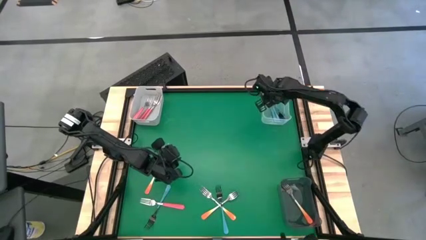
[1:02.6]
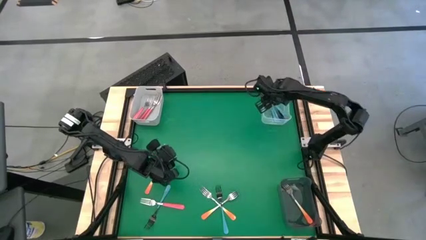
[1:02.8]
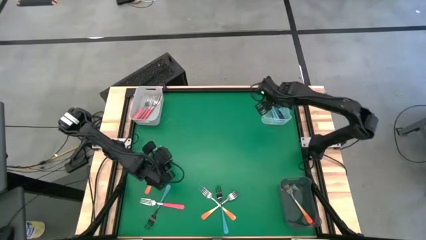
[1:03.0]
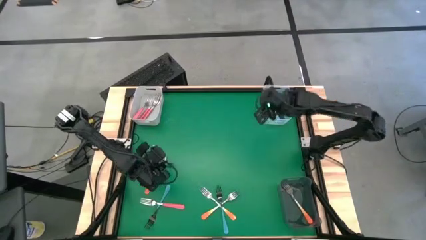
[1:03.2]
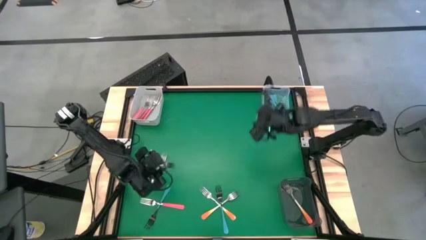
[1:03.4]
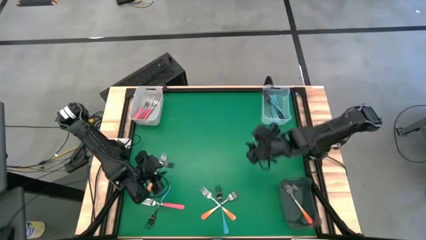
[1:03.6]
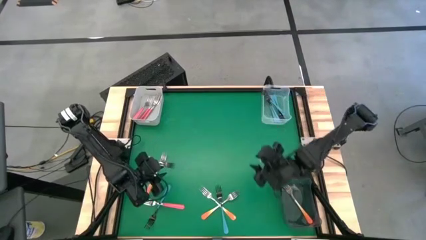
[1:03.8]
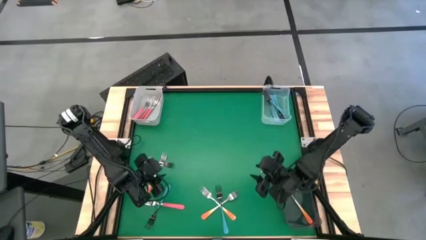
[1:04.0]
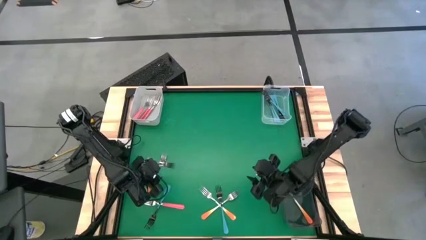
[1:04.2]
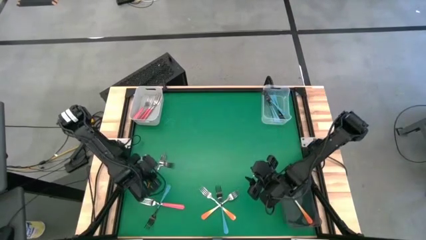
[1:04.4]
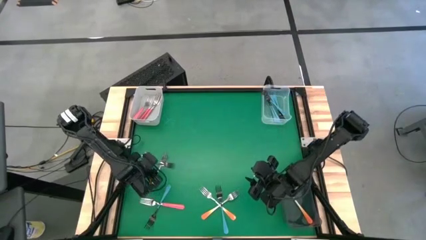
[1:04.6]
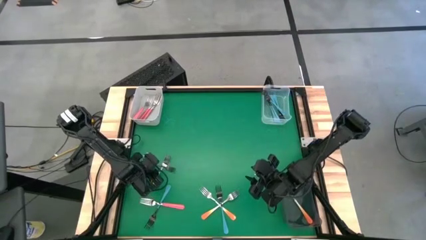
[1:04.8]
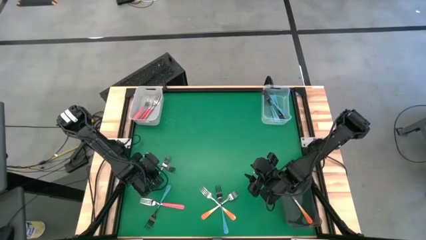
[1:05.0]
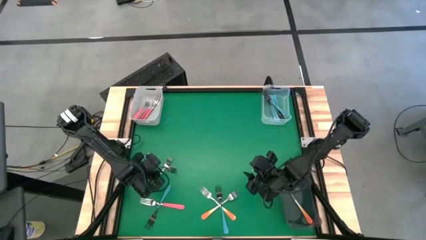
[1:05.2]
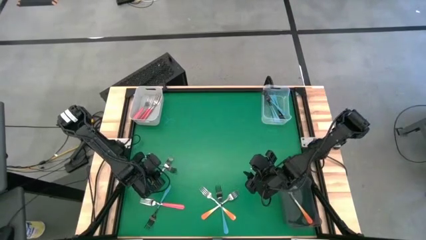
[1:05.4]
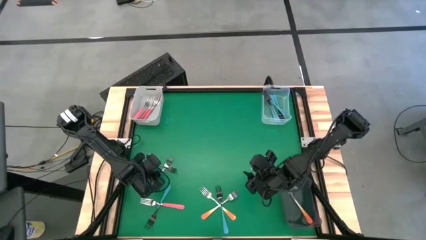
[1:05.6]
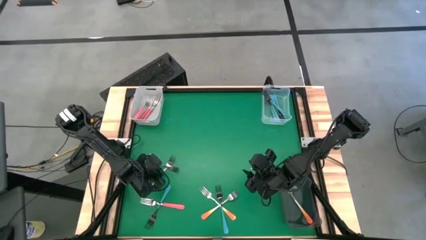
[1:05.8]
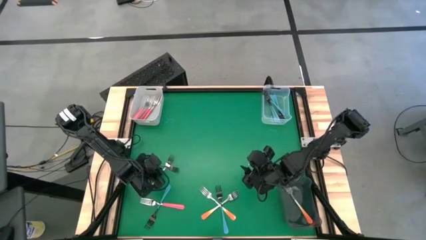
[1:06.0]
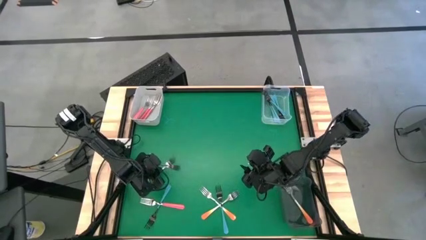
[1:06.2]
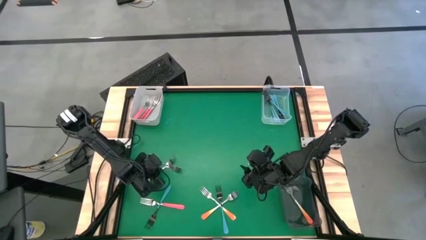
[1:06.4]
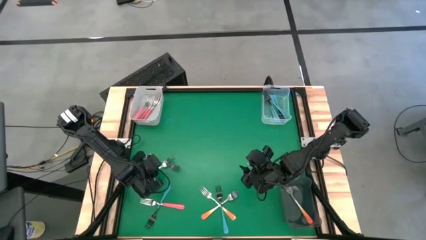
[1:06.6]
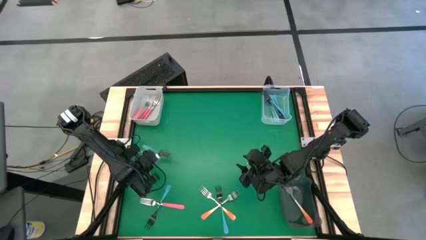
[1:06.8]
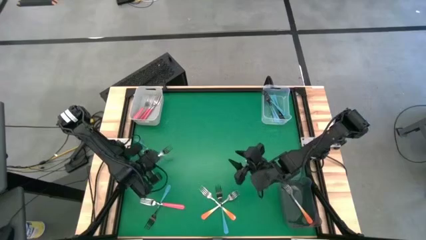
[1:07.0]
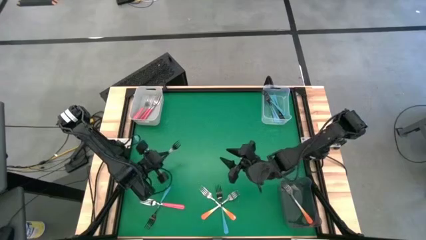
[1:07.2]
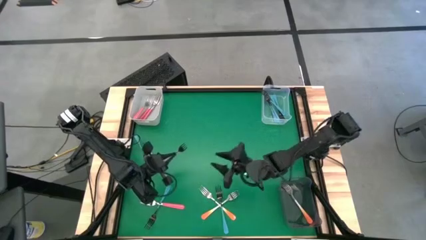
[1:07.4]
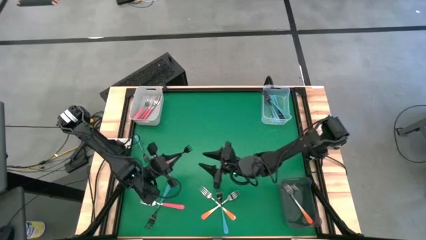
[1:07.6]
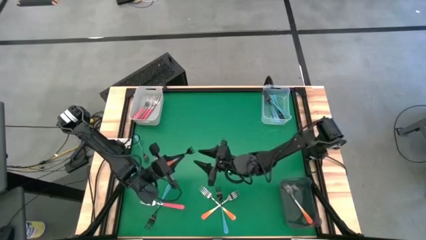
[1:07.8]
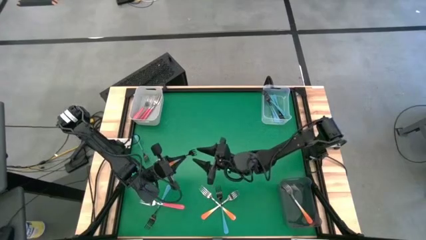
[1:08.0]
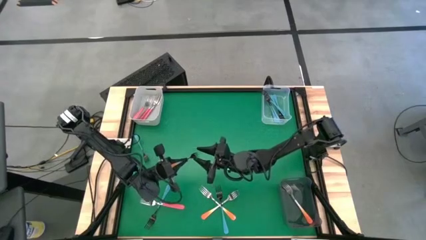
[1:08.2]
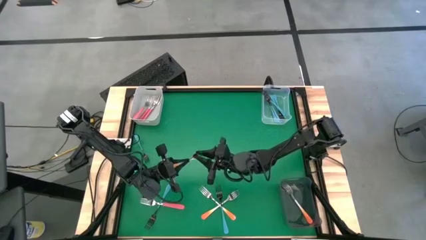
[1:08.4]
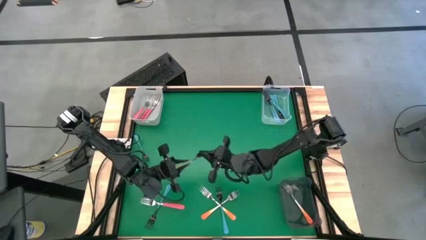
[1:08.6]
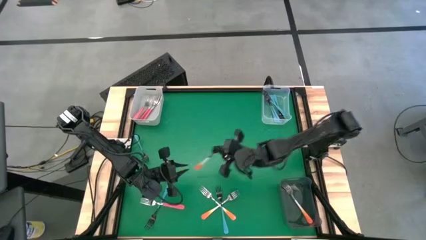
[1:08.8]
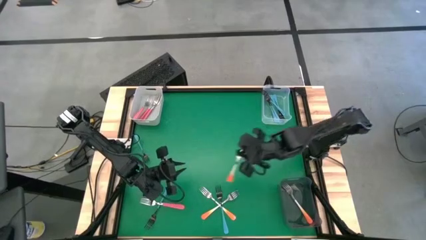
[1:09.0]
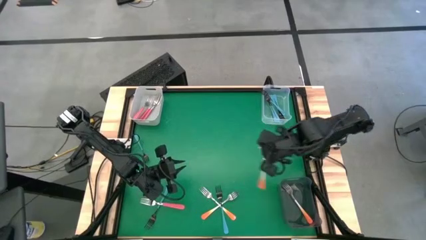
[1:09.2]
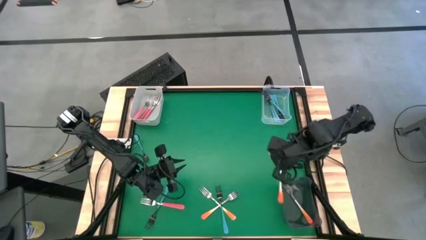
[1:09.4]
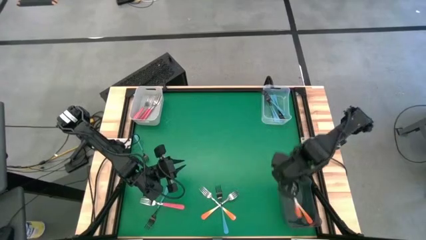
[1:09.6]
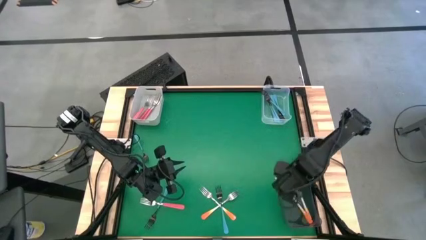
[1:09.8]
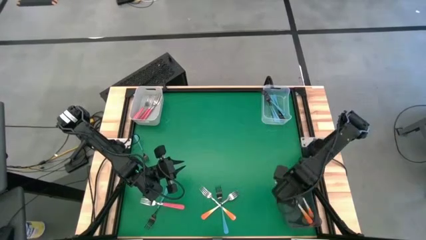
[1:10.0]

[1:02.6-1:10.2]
Task: Sort silverware by color (type)
Put the orange fork into the black bin

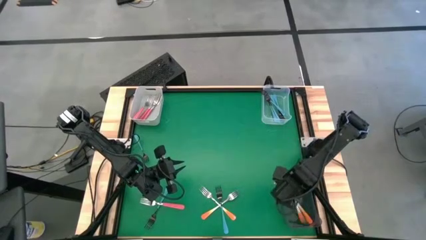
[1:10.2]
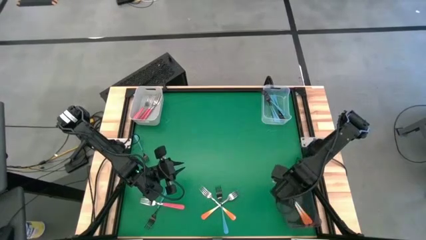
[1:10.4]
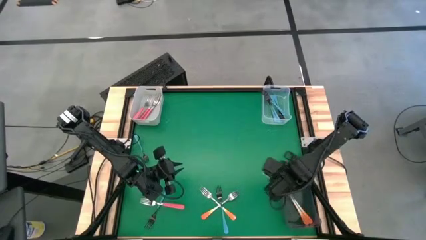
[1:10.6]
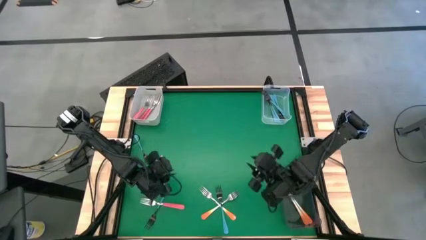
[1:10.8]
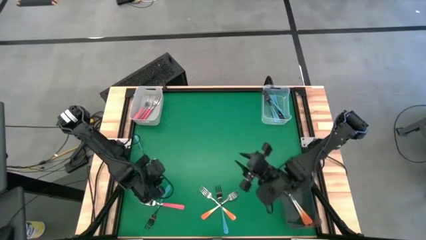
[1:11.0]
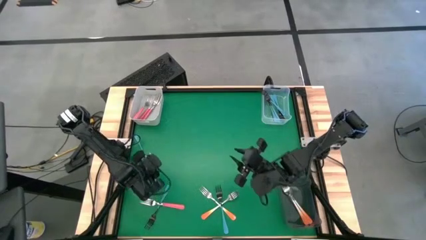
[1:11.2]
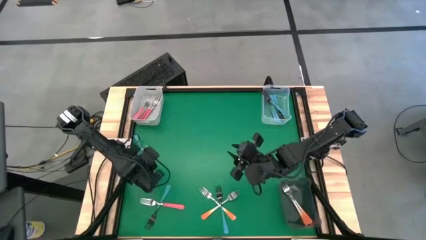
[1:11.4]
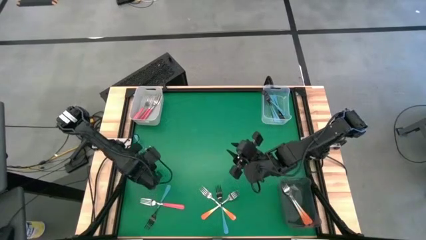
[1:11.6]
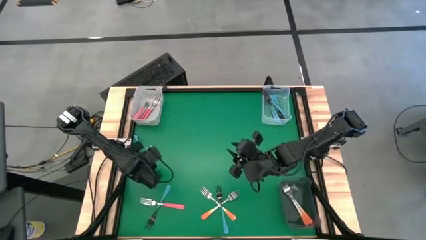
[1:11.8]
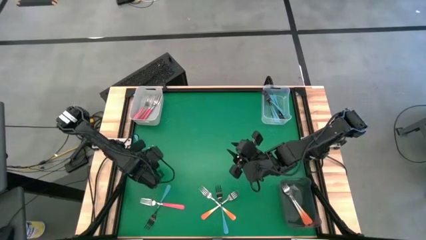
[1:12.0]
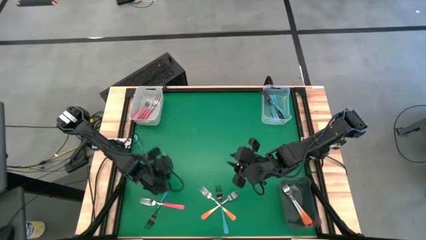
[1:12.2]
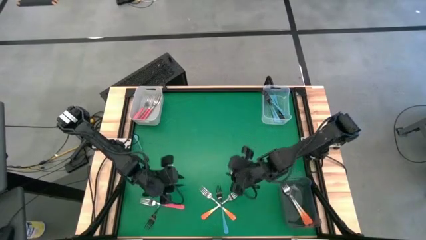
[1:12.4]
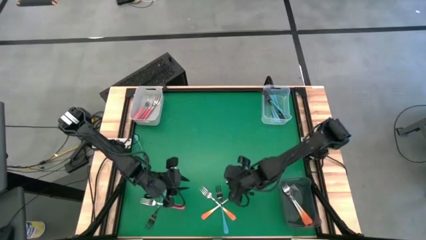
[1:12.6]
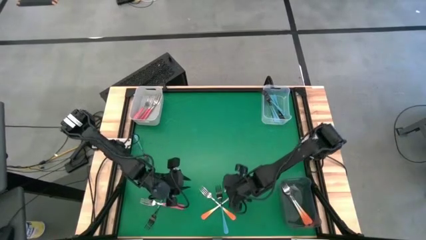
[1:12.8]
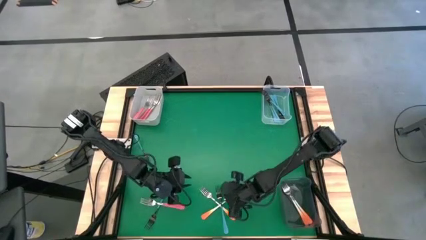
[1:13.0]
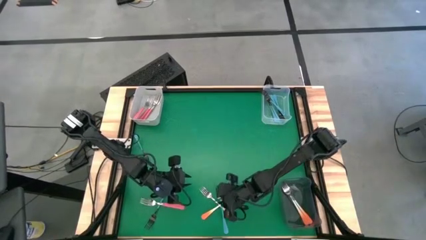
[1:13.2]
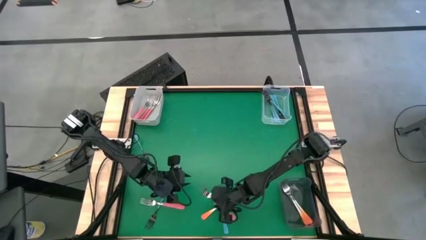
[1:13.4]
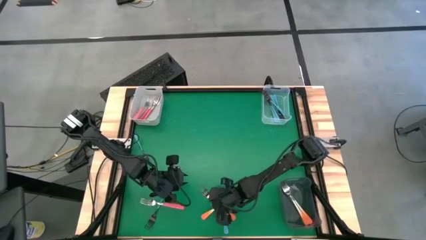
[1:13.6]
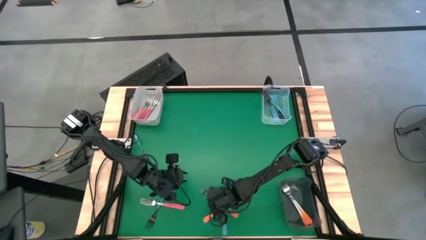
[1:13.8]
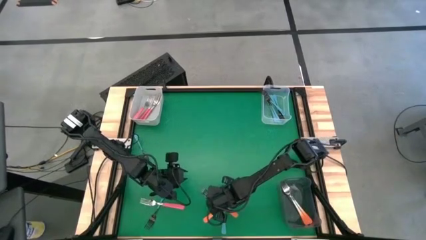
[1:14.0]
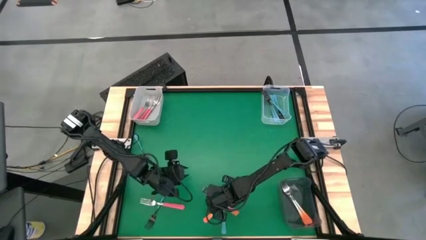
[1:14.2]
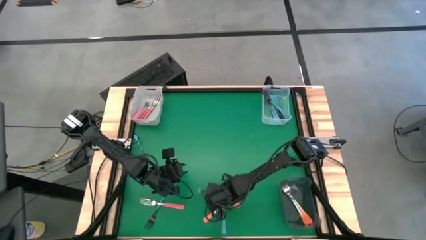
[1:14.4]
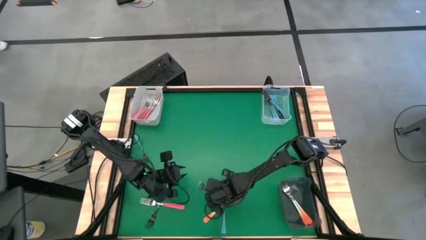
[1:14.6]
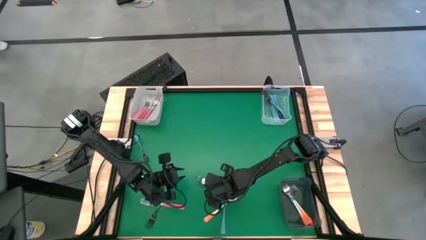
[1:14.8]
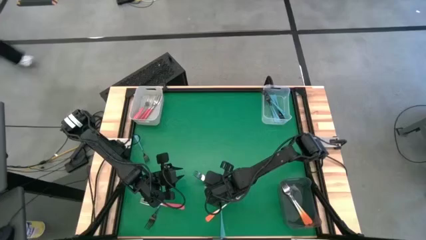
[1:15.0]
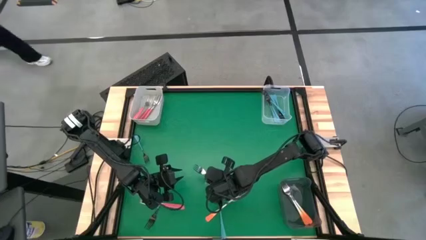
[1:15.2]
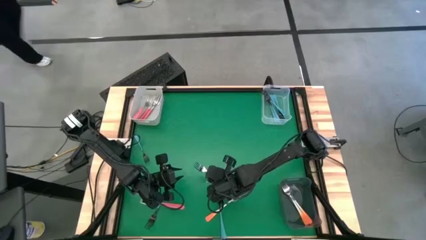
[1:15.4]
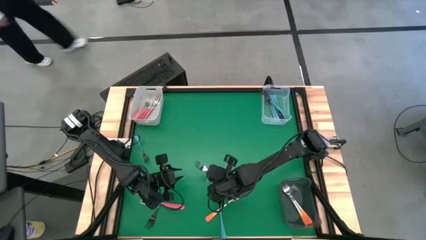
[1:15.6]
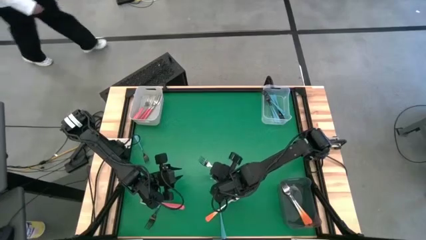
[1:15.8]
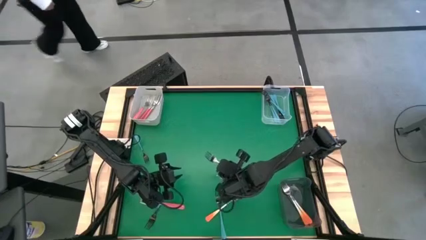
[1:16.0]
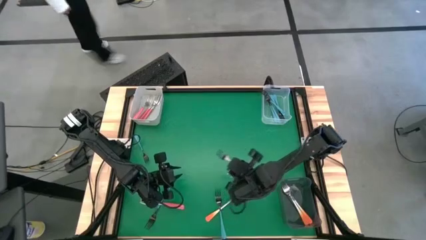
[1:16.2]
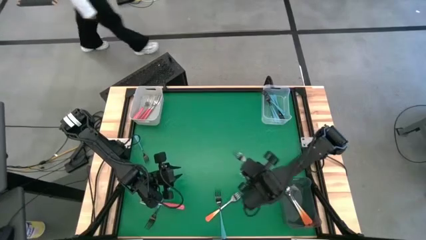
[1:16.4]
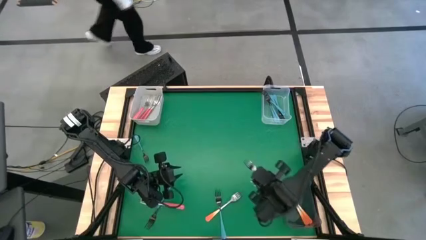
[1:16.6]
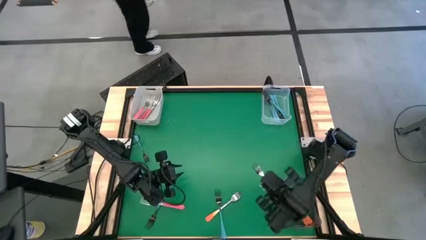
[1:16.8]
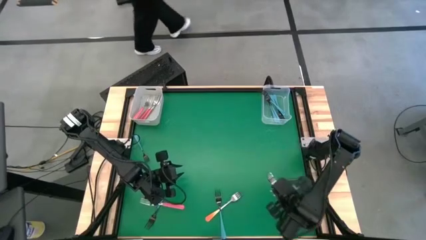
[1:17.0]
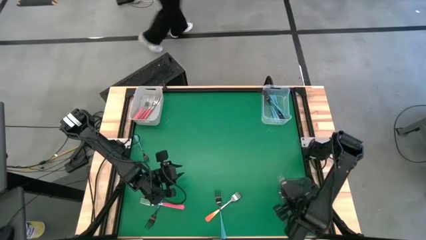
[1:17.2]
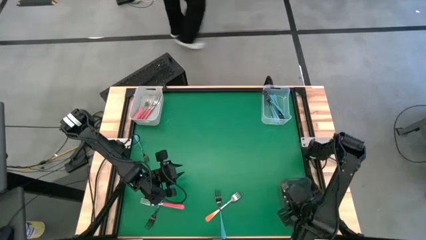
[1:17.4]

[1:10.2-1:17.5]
Put the orange fork into the black bin

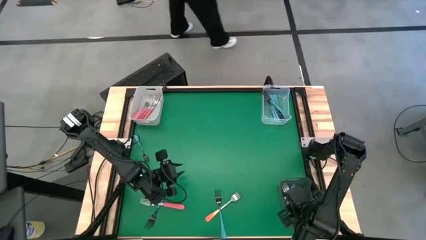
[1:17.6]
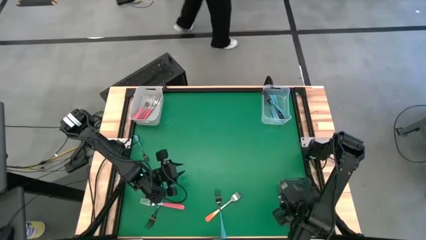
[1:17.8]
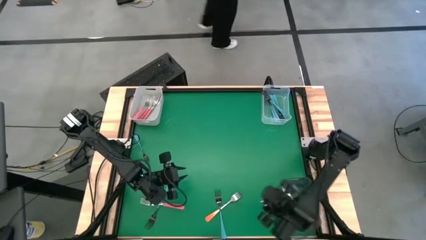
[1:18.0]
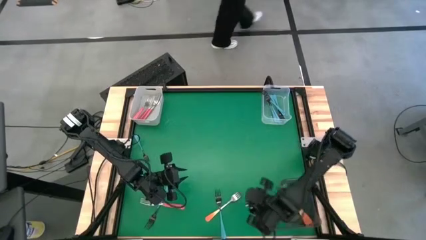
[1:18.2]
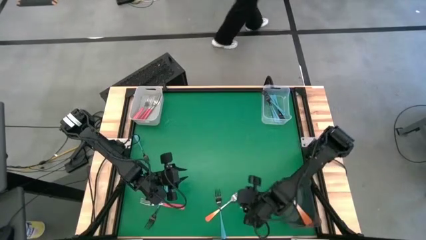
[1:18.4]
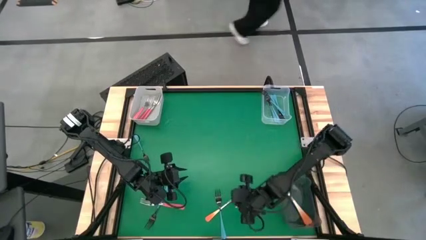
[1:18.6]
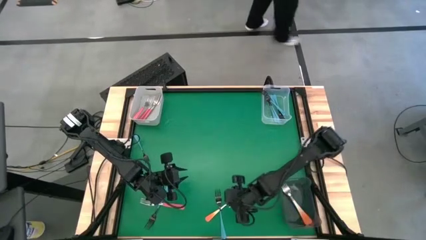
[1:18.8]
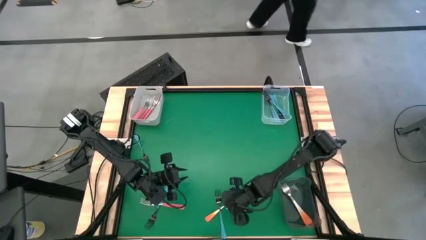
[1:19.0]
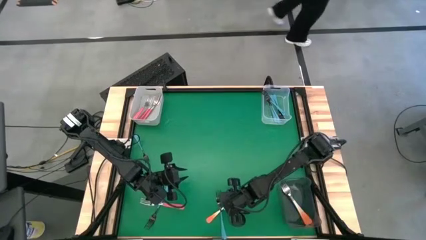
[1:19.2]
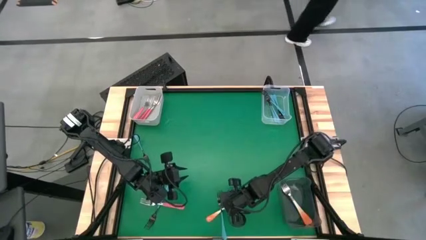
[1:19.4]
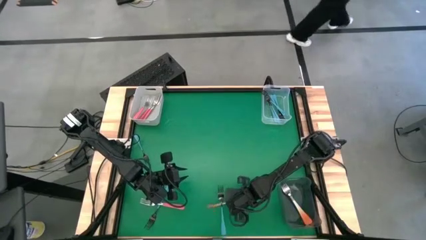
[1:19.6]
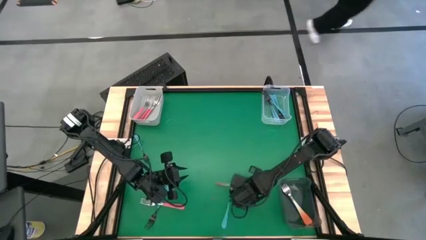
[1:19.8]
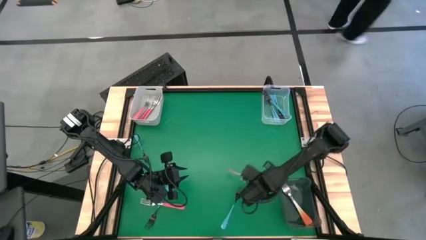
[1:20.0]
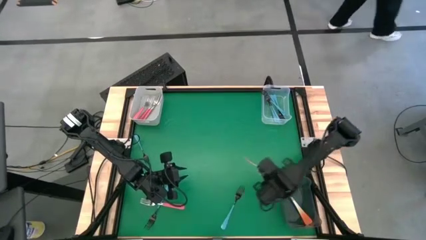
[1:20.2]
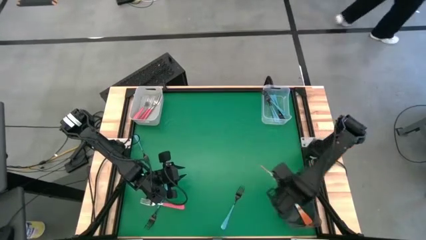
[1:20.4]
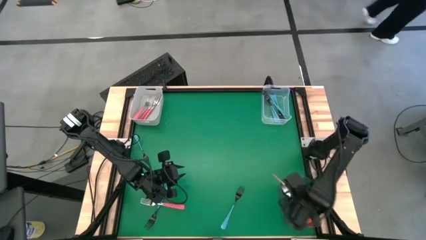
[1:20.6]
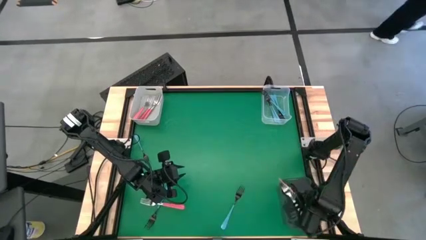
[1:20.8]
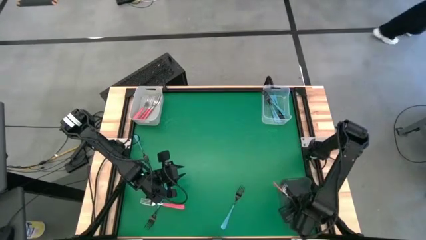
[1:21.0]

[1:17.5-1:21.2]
Put the orange fork into the black bin
